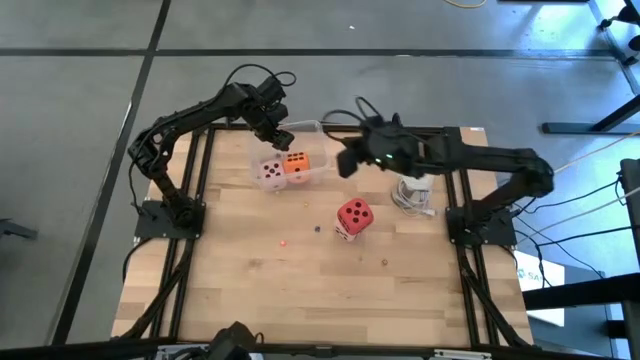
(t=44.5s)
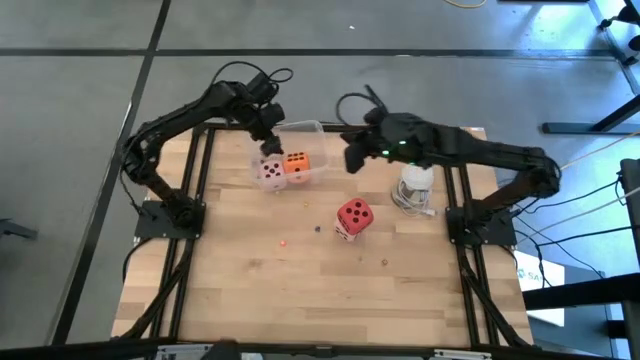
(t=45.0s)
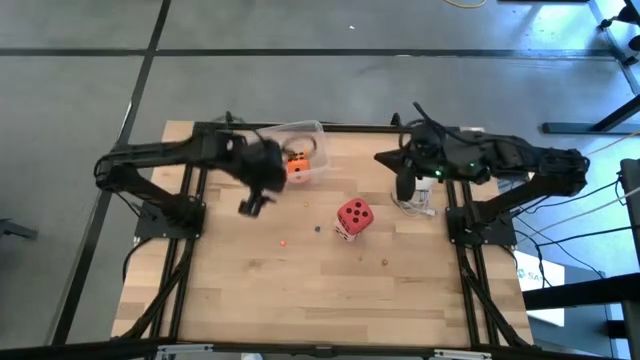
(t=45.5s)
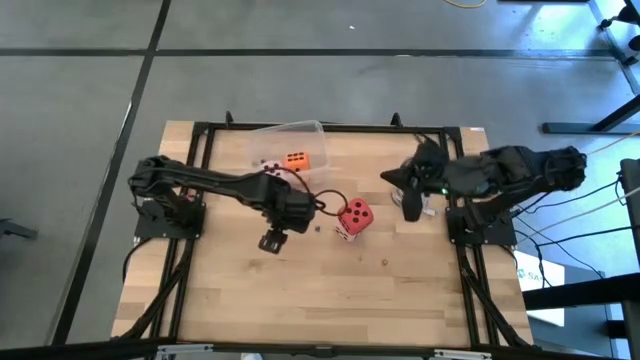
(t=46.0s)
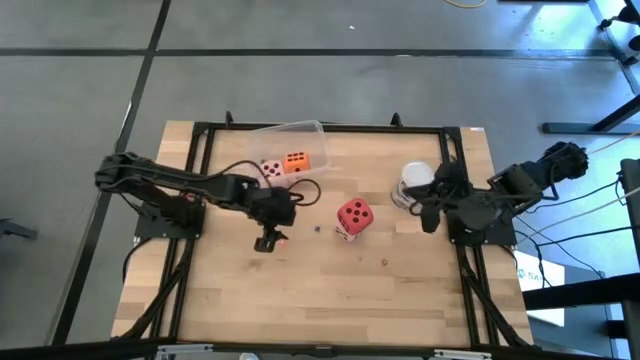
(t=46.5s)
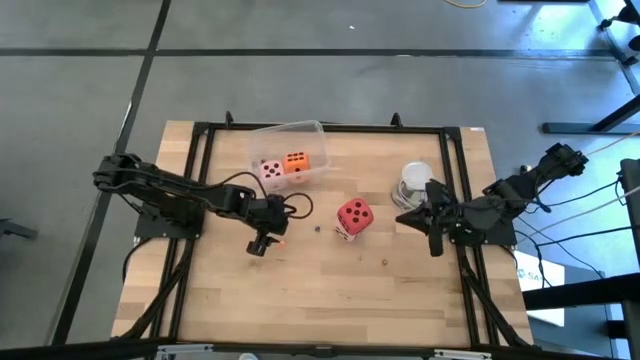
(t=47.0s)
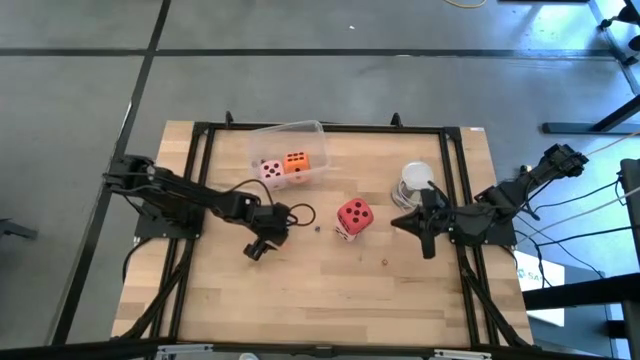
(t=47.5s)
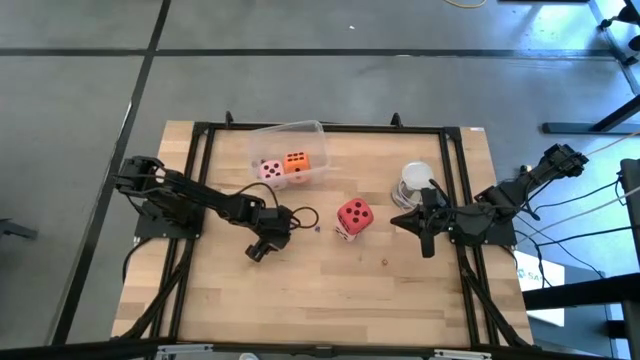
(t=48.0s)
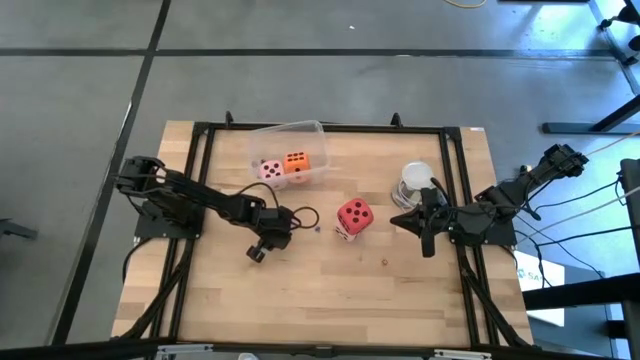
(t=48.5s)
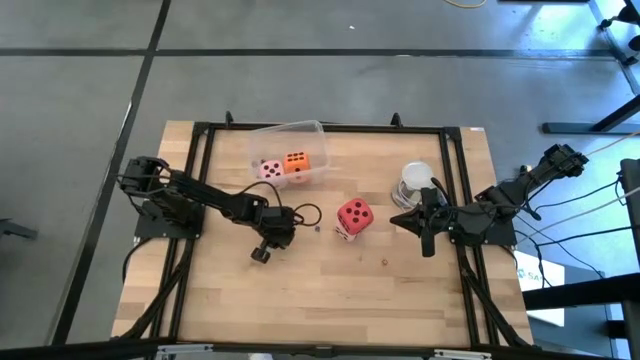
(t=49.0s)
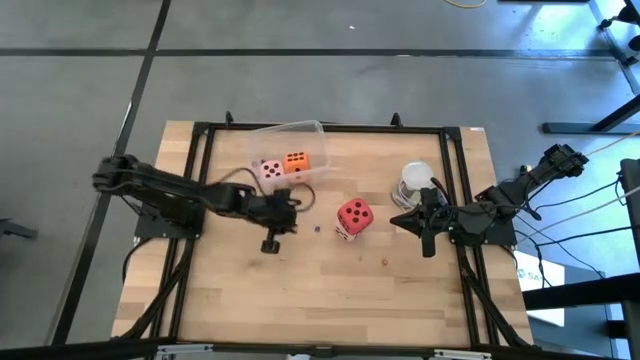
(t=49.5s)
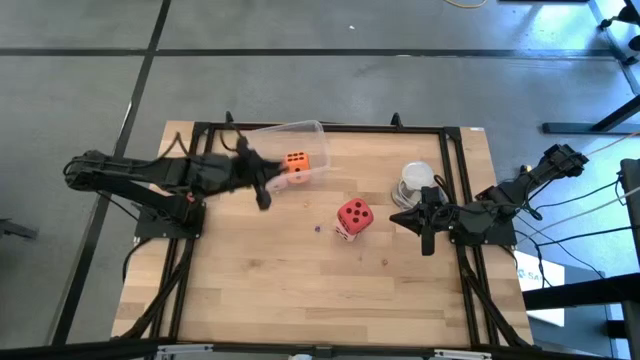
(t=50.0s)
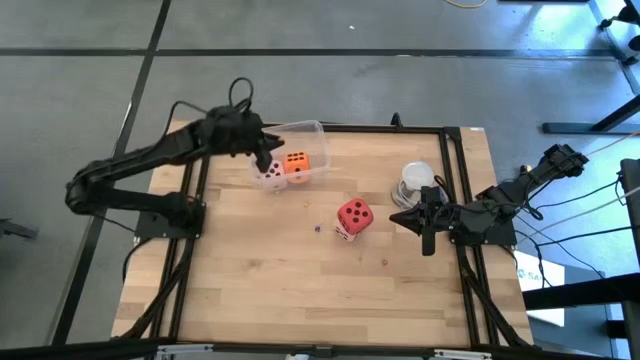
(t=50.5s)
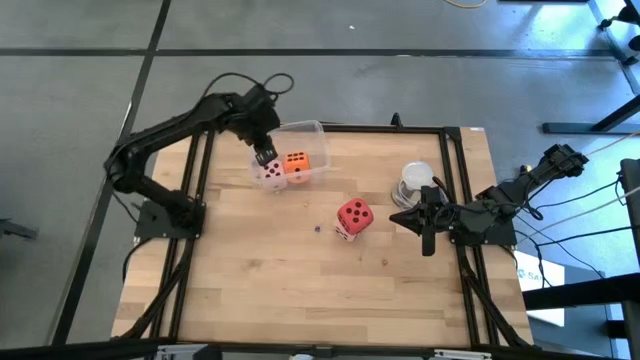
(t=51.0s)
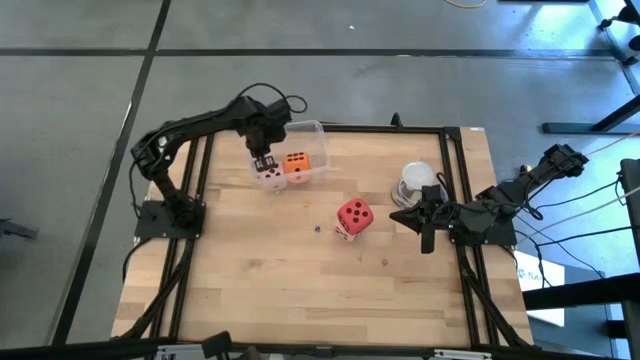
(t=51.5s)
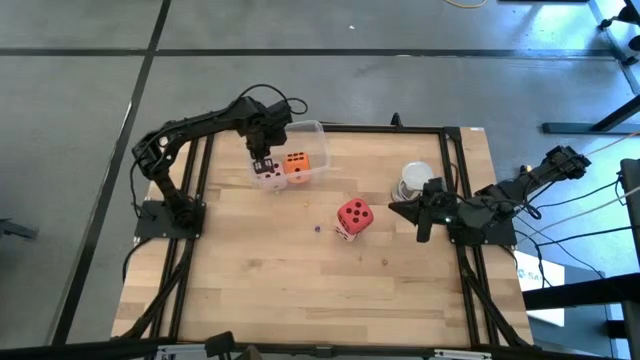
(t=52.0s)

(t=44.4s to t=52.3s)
Task: Pick & Place Dice
Put the small orange die into the transparent bin

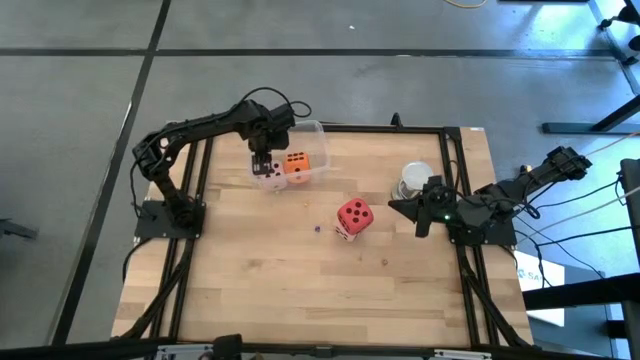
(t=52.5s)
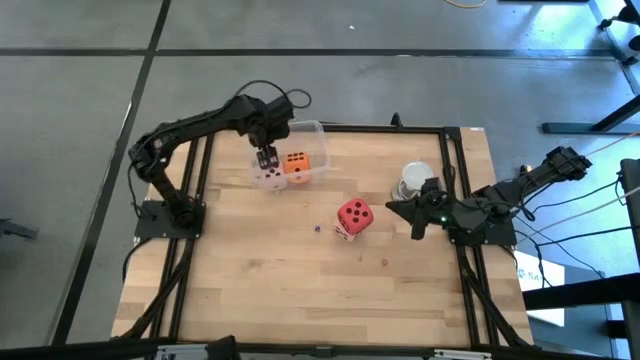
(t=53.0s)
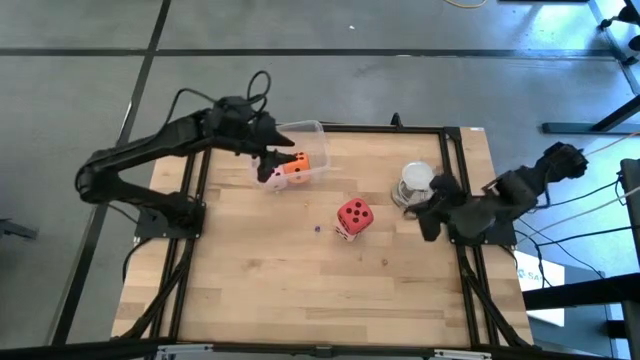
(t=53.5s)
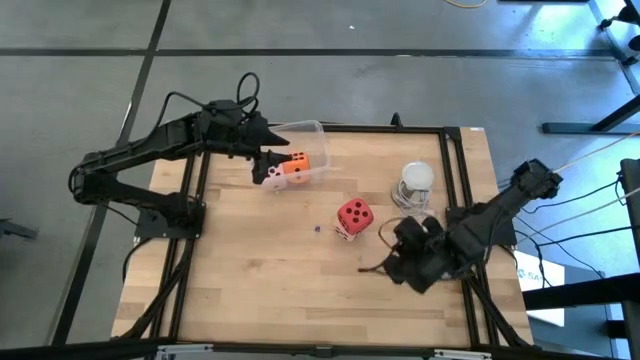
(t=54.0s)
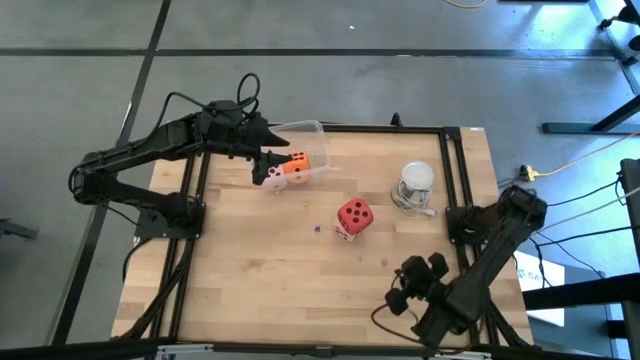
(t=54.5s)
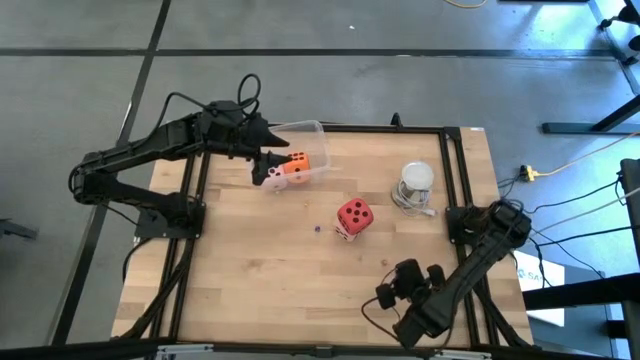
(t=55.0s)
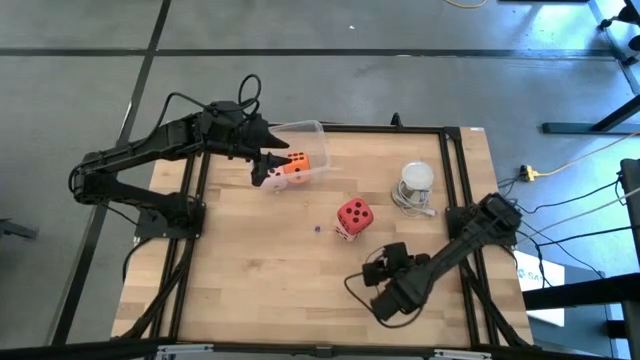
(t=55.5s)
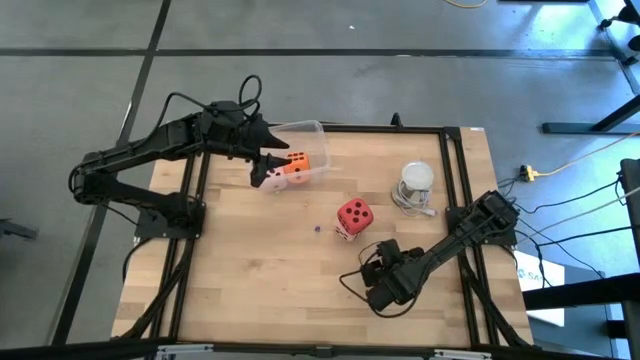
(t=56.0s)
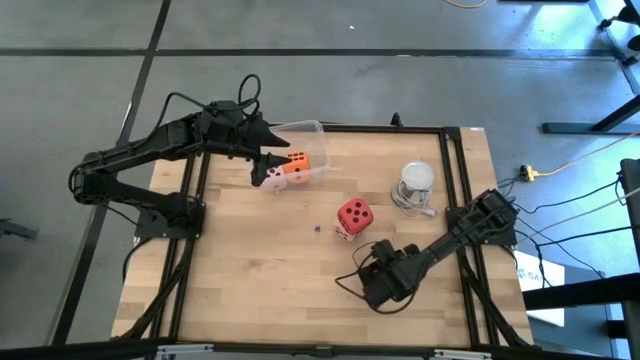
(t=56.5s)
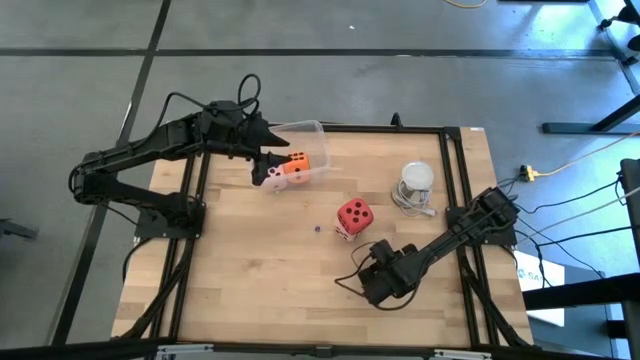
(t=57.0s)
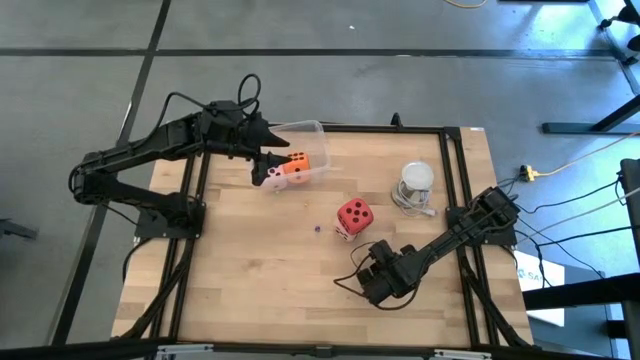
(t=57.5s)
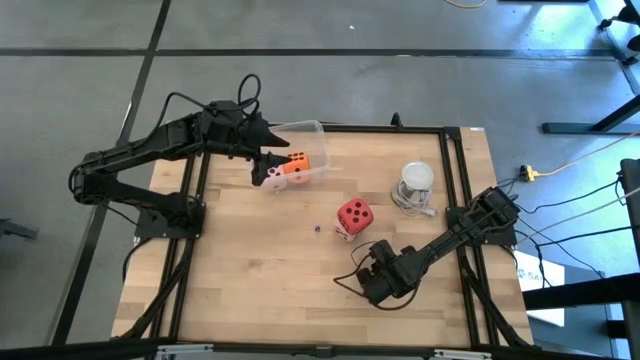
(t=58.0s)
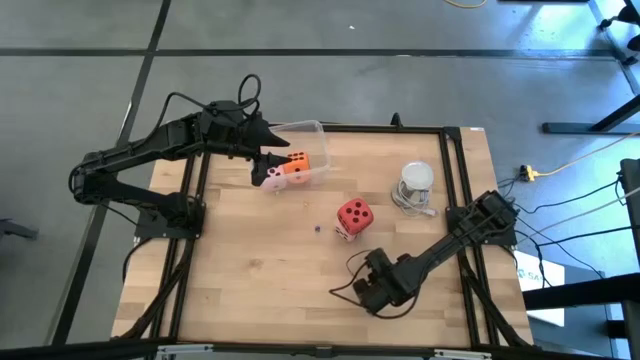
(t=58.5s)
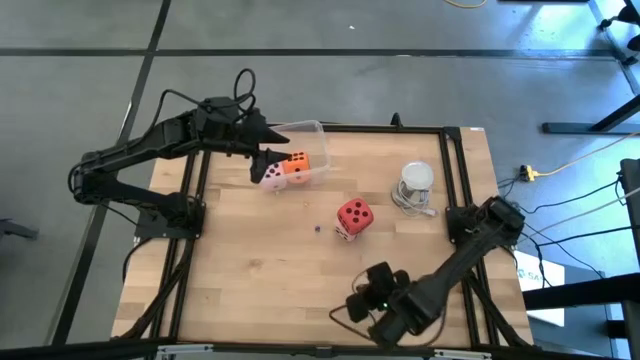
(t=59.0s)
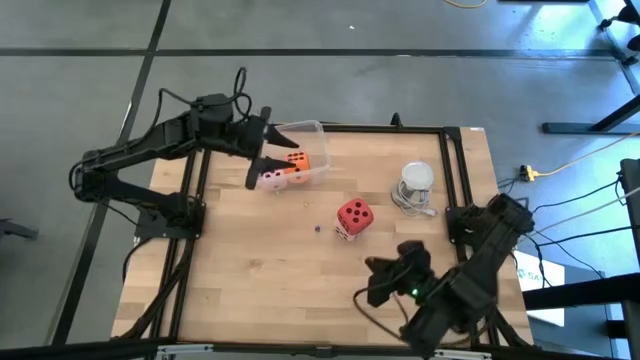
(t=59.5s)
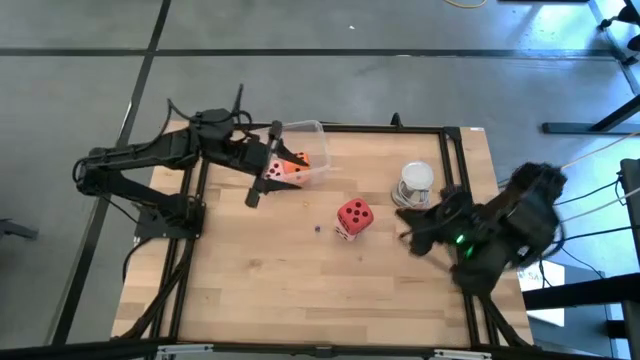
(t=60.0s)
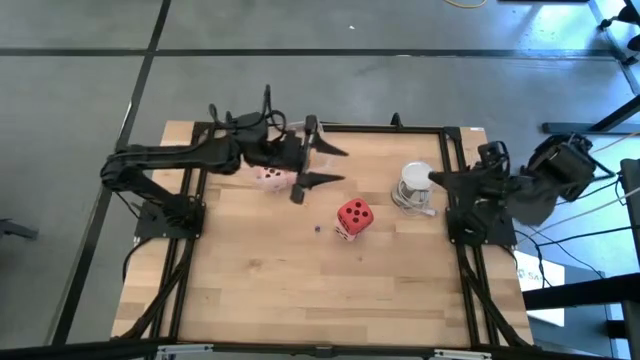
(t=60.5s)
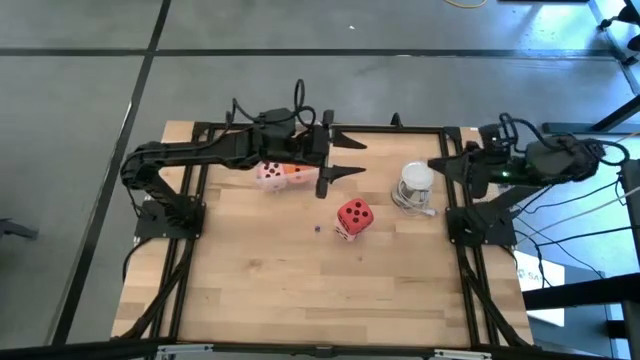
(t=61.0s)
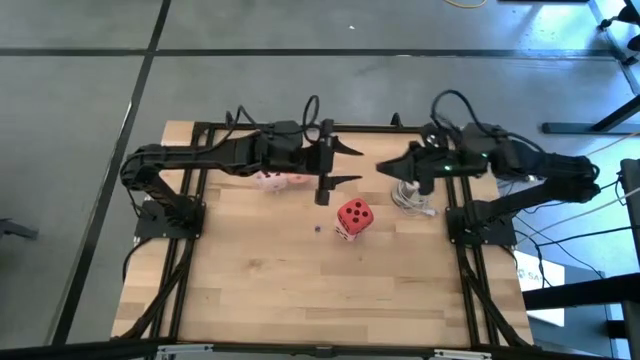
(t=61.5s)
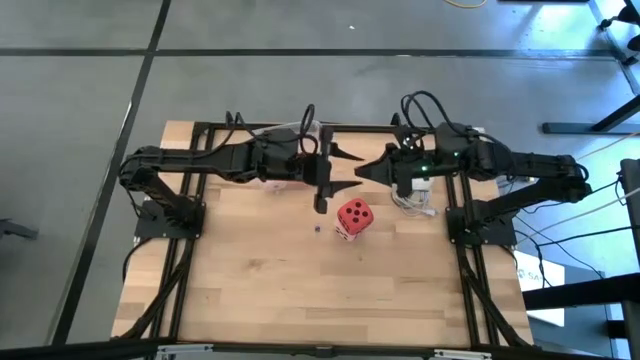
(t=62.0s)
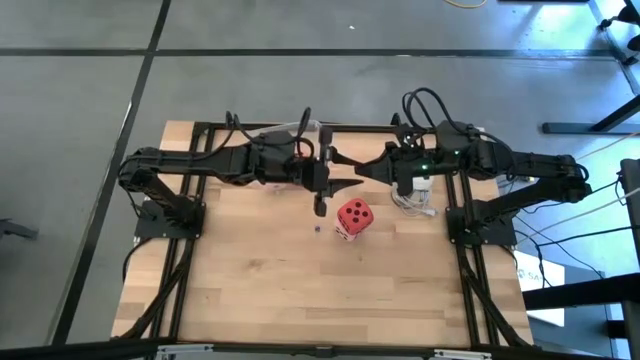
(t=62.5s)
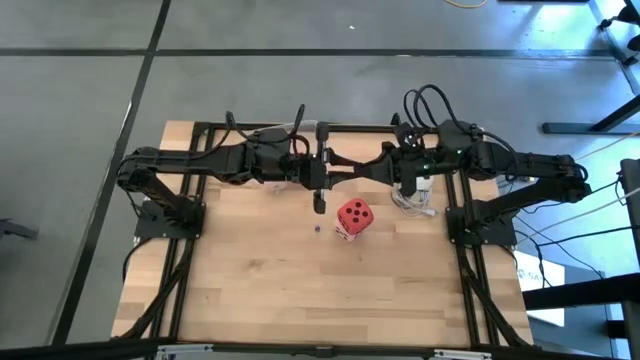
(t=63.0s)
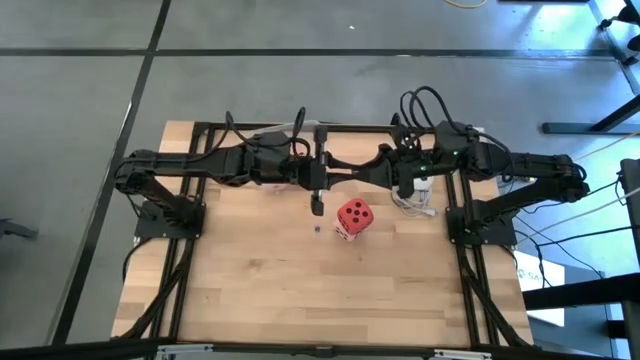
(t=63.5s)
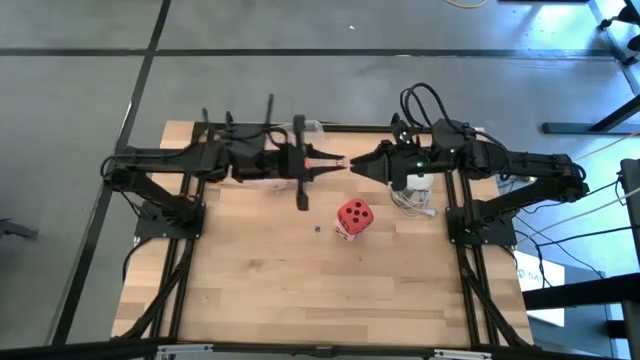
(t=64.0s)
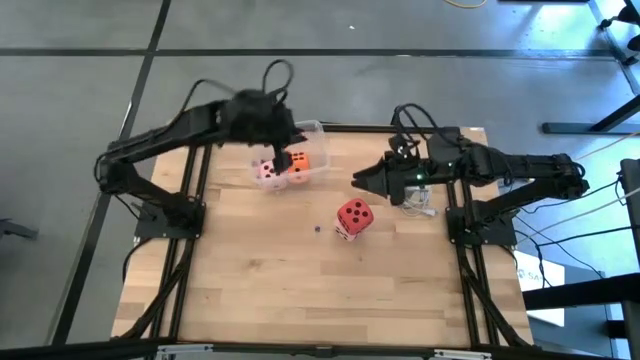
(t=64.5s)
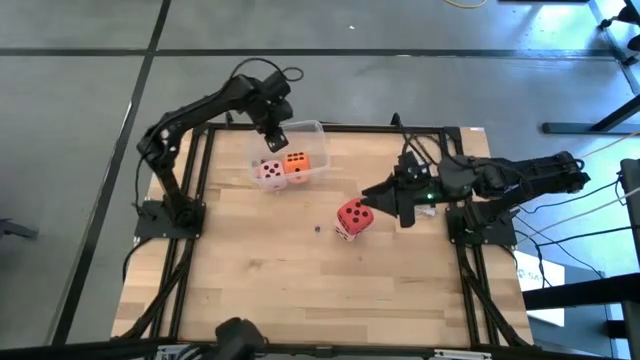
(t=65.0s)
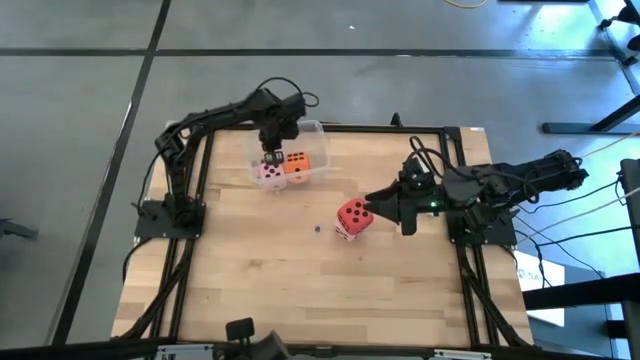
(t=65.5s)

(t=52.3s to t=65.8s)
Put the small red dice into the transparent bin

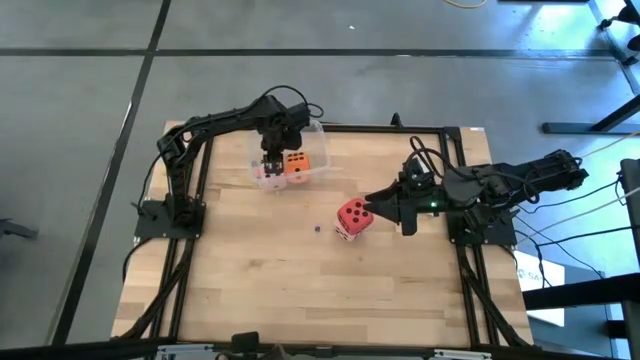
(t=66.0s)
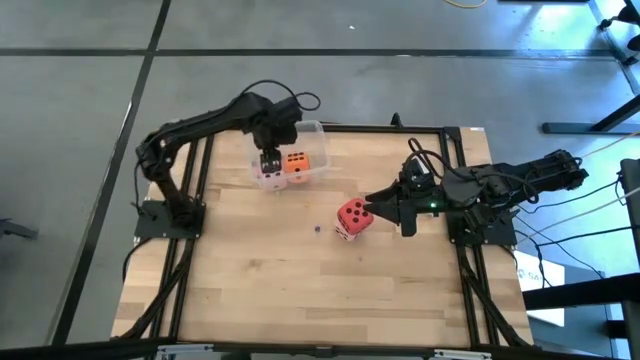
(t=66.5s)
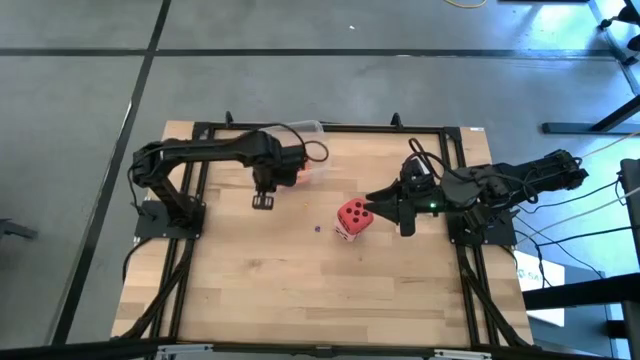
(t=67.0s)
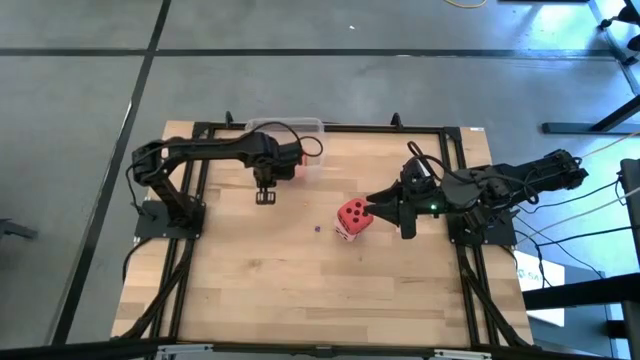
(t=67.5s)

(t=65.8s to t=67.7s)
Adjust the transparent bin
